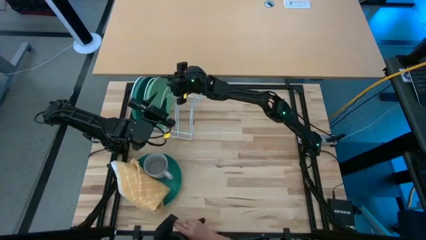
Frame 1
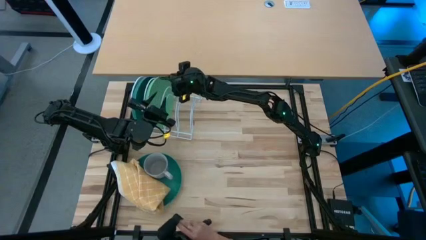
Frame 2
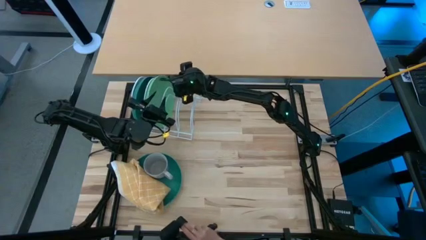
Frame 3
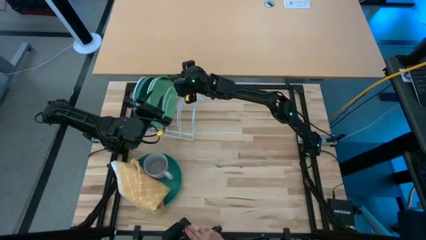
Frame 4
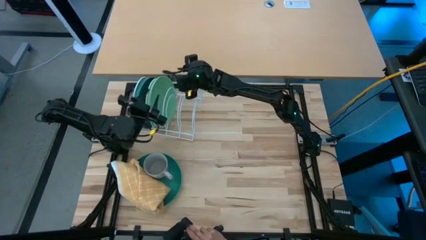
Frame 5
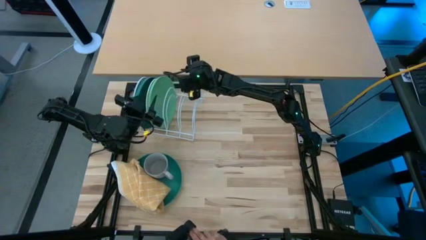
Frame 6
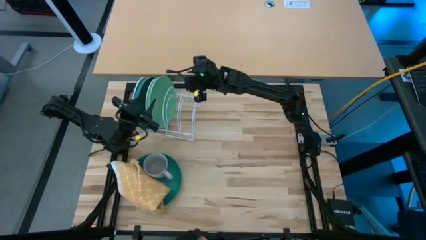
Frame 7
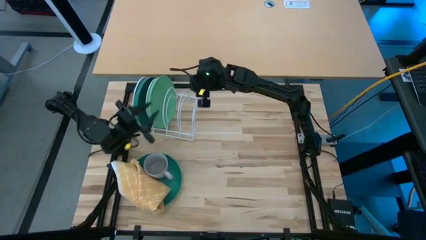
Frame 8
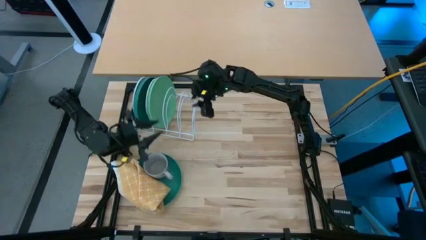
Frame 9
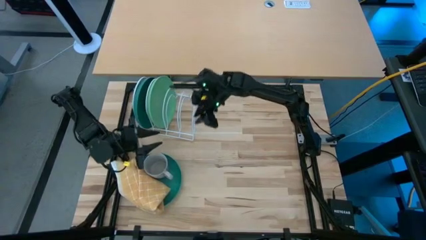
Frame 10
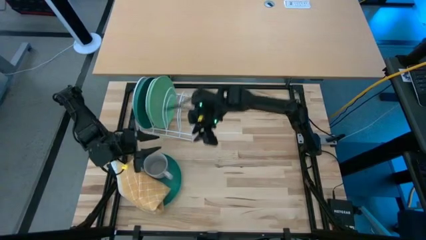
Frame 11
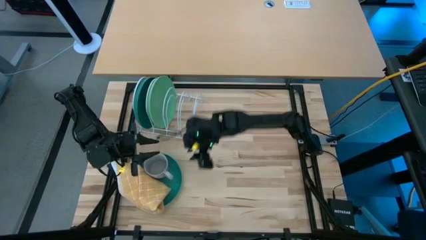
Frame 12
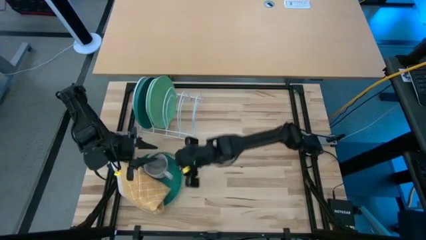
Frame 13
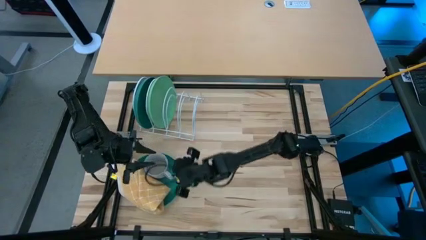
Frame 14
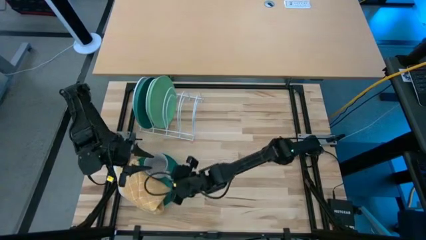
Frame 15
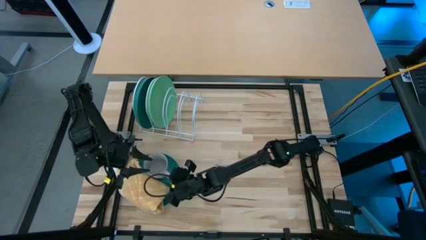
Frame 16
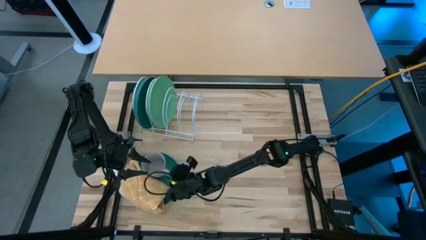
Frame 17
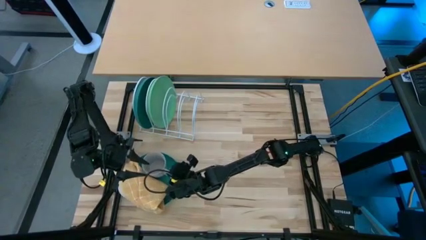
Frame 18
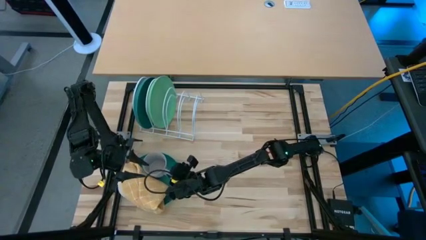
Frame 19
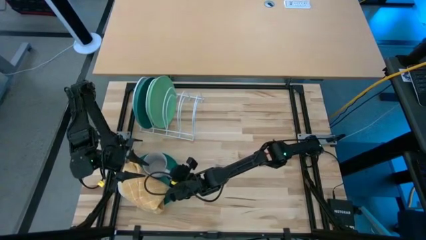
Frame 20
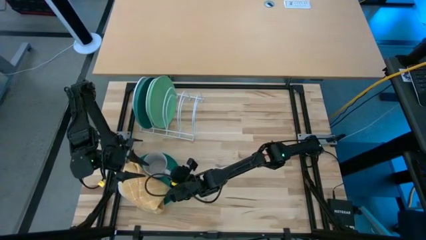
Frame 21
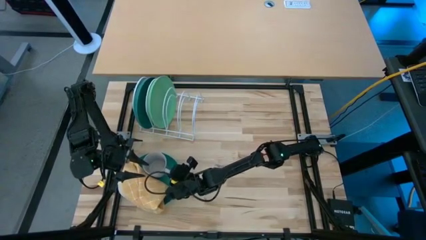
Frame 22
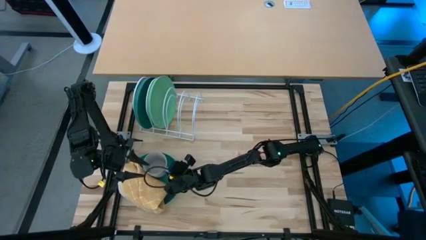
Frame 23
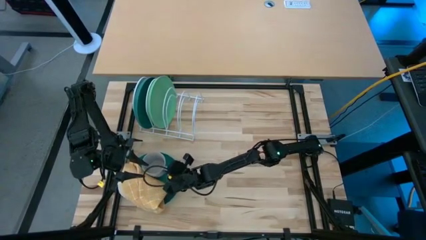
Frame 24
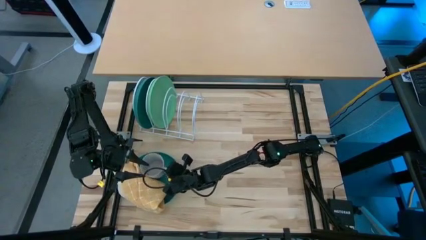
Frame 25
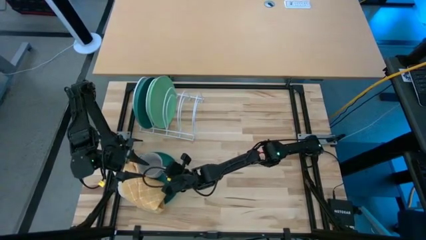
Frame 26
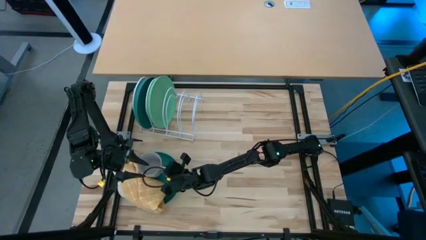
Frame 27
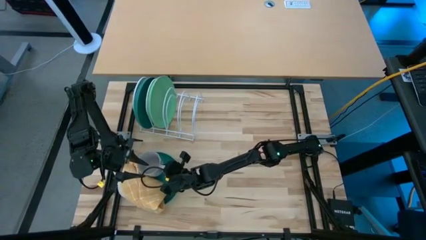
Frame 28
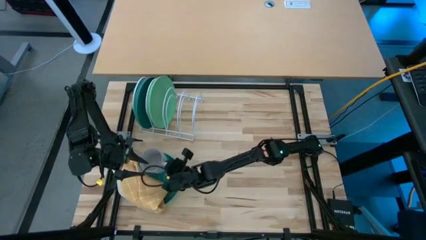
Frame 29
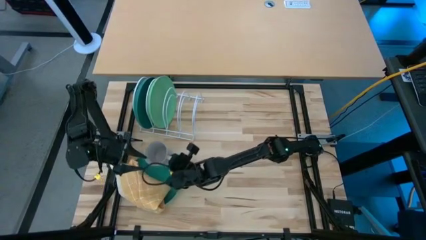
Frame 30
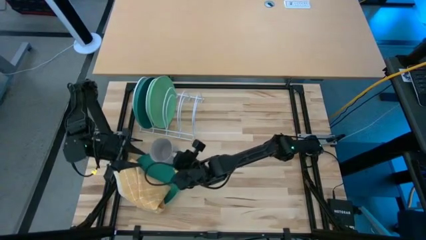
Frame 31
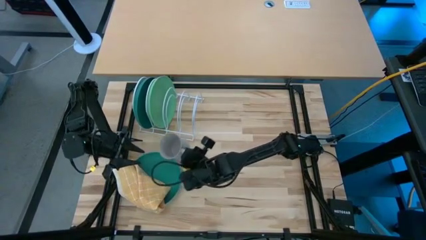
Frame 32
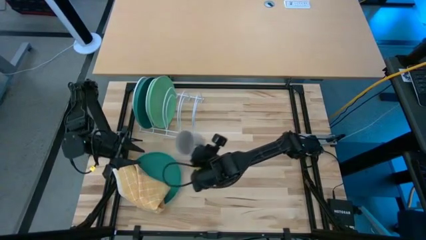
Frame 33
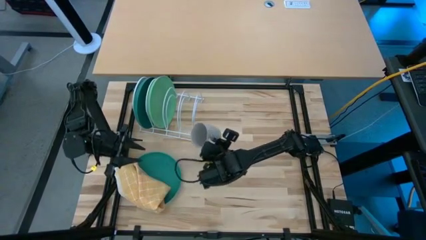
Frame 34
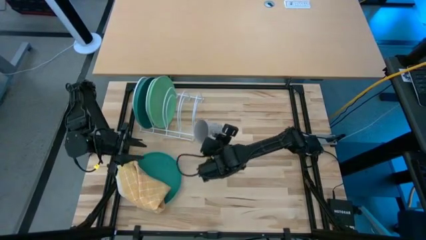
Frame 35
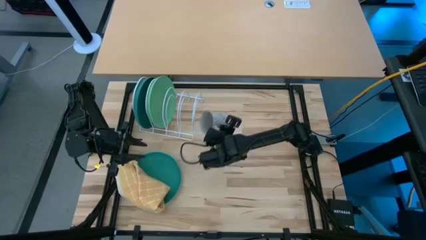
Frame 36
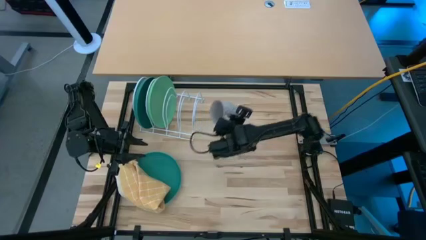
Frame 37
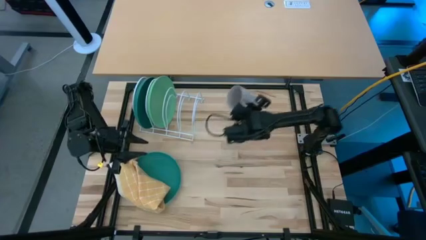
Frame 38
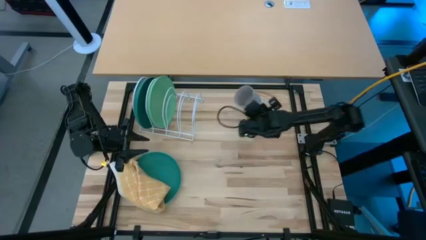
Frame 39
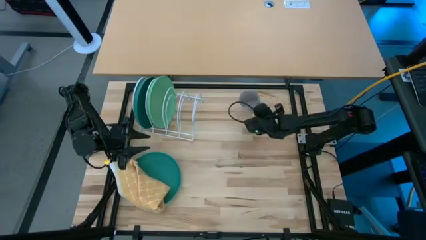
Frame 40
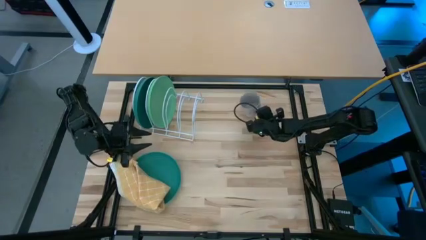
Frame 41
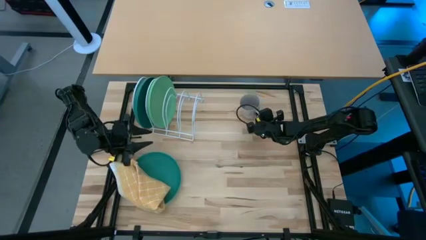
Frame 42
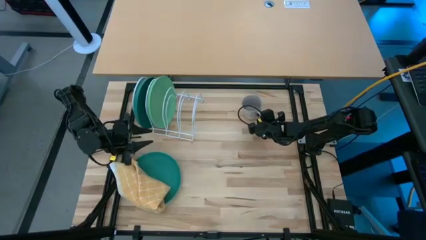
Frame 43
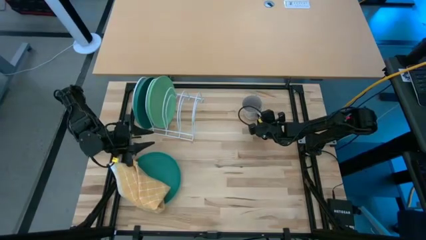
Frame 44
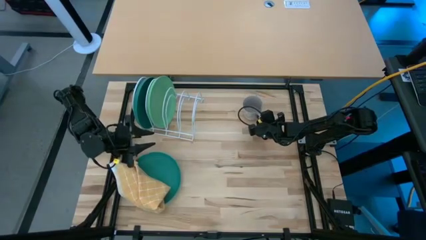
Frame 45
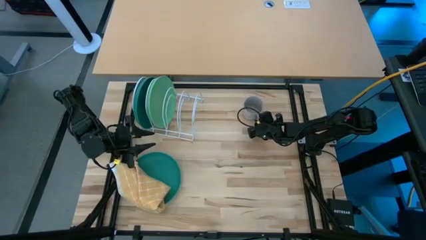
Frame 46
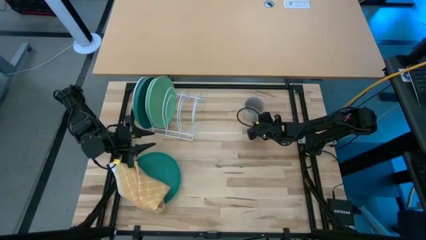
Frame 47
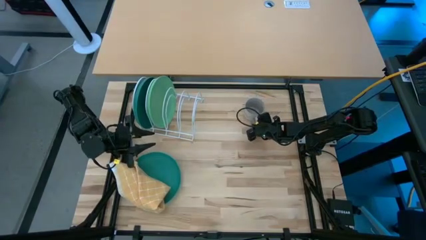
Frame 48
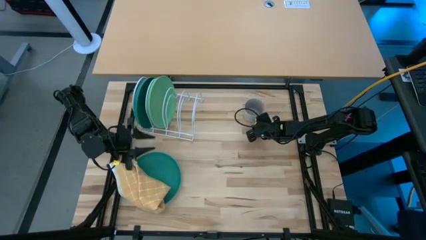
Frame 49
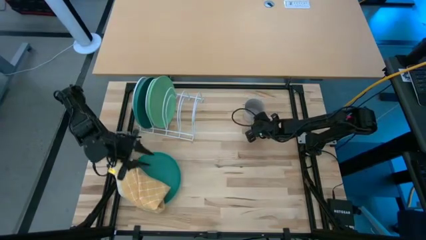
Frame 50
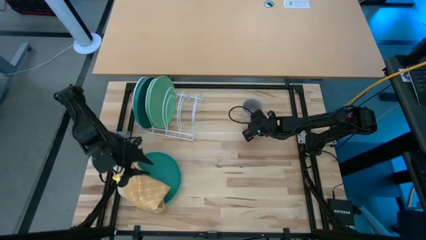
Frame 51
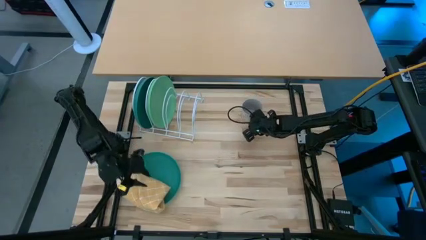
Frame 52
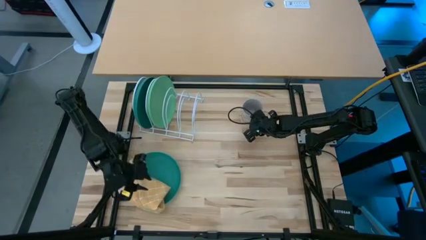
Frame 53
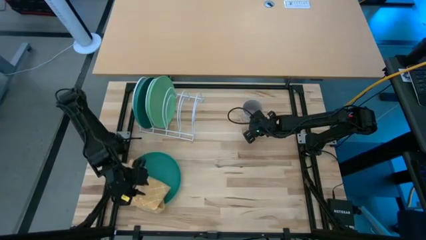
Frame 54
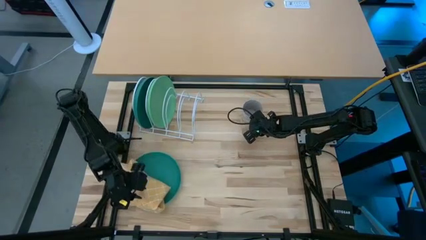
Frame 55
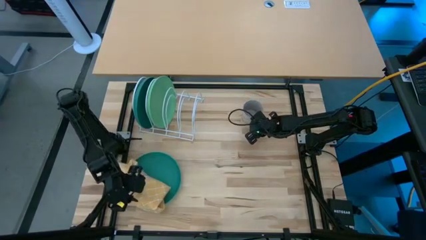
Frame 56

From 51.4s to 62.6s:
Task: Sort dishes
Move the gray mug to the top of the table

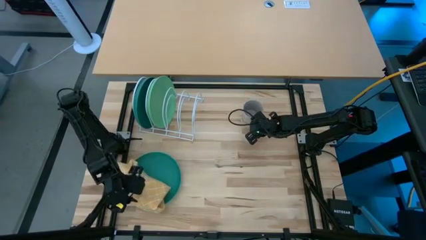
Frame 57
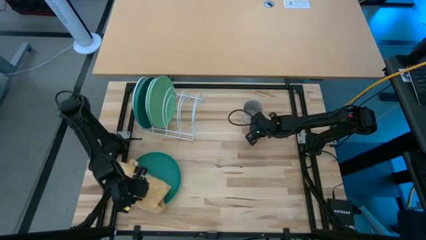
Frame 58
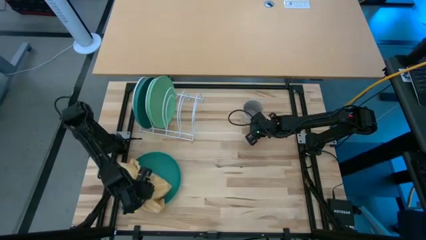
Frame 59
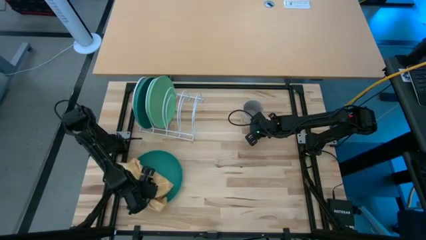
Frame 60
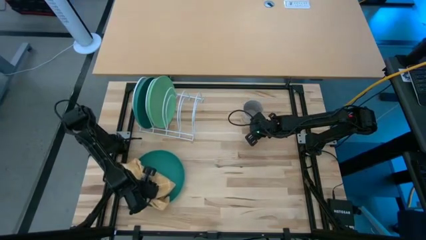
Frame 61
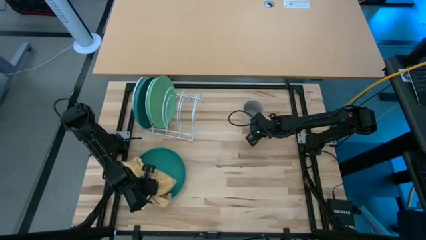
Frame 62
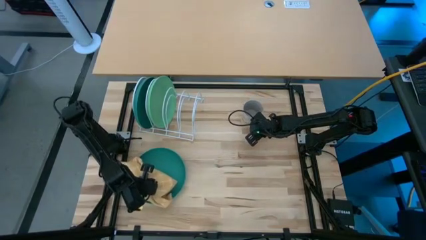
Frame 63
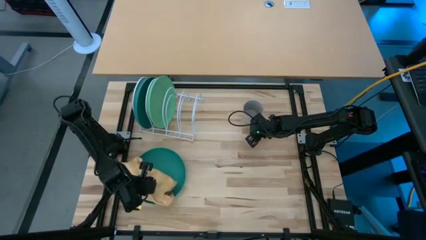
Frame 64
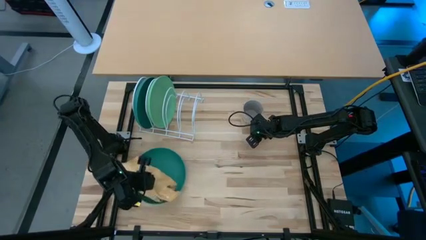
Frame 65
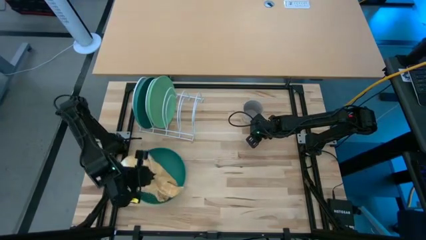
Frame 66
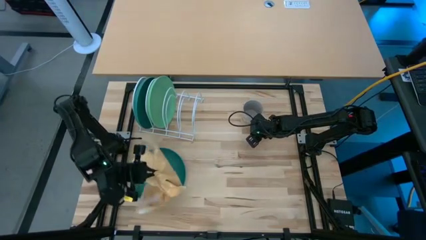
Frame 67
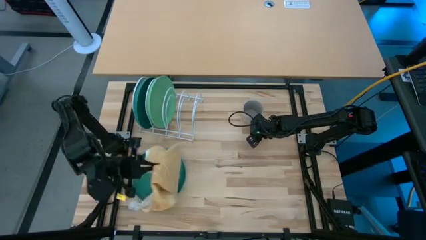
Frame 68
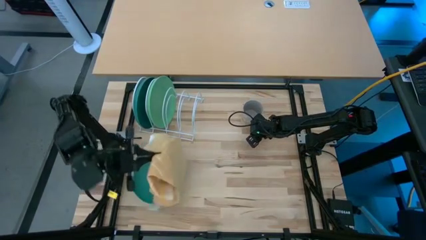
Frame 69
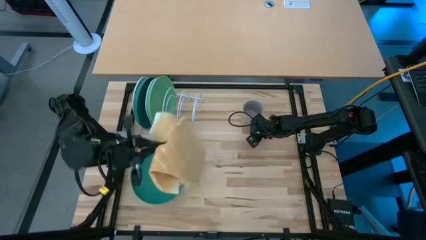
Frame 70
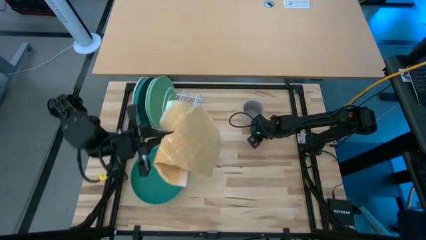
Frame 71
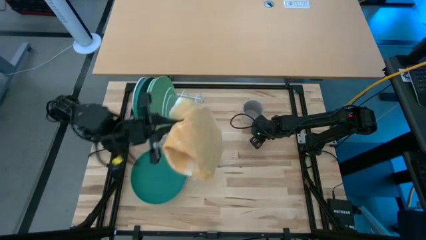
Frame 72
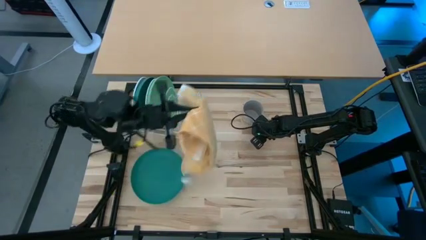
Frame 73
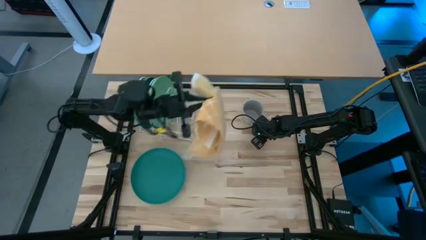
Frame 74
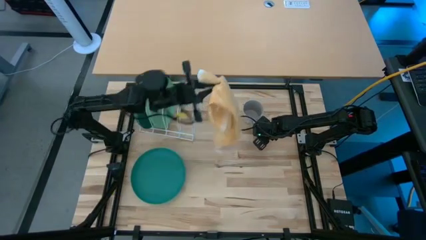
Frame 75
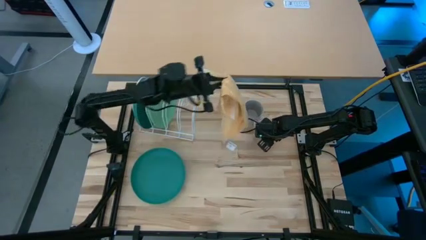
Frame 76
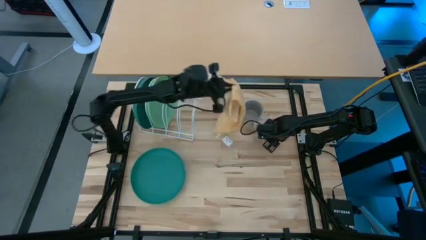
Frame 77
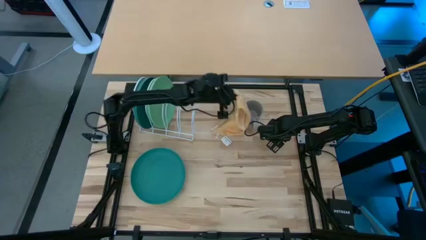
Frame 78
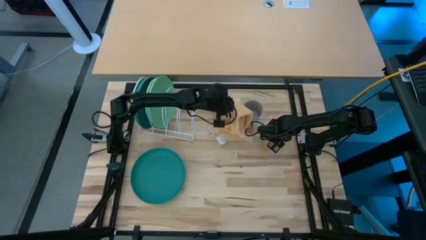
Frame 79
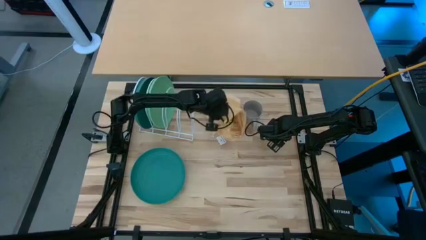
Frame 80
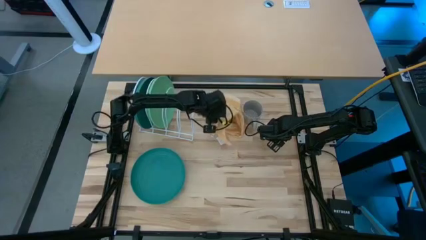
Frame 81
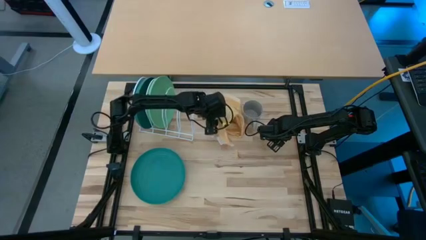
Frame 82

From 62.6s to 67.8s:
Move the orange napkin to the top of the table
